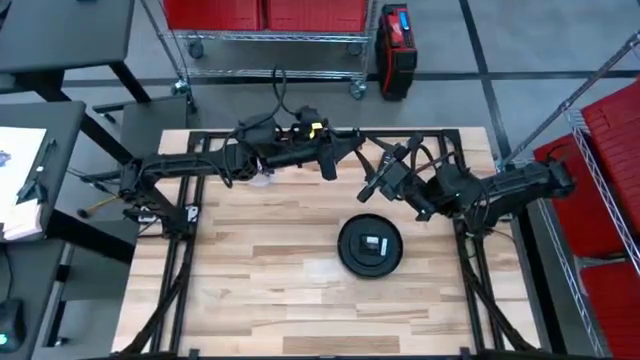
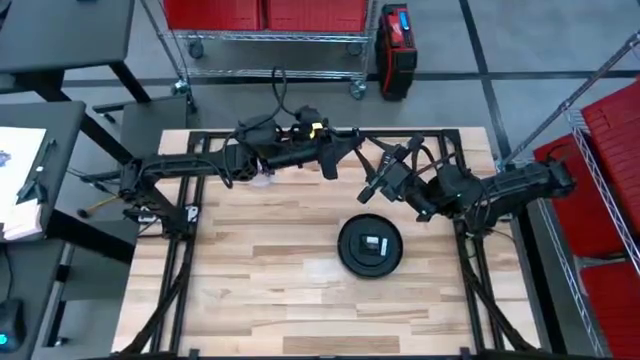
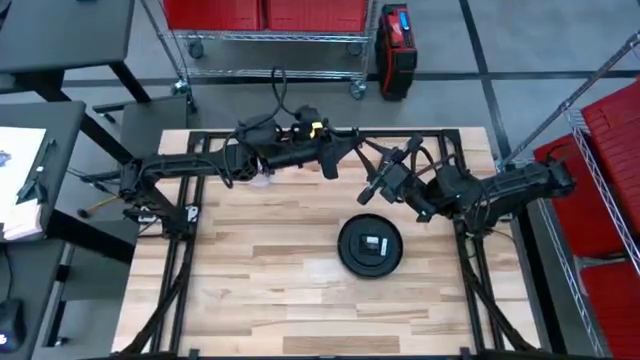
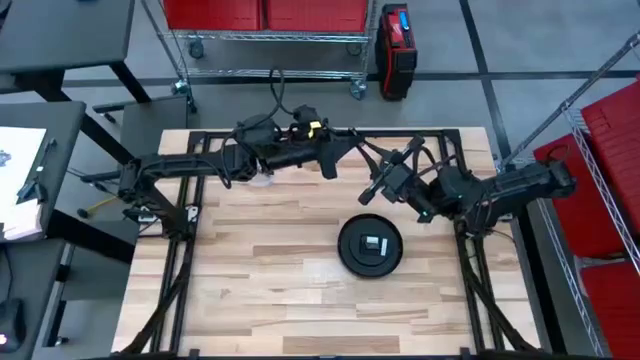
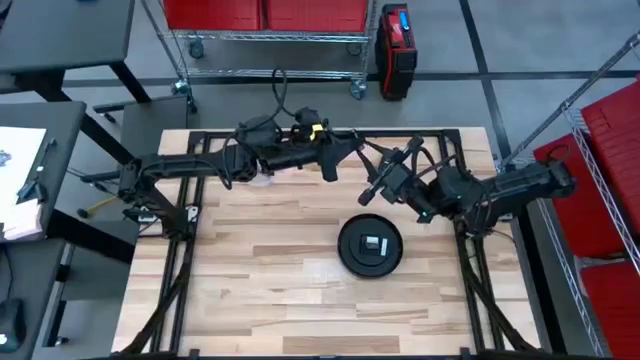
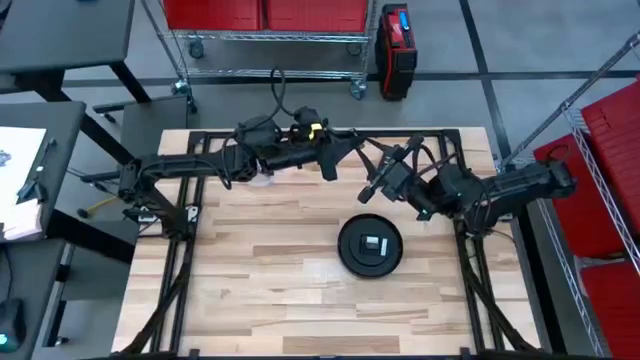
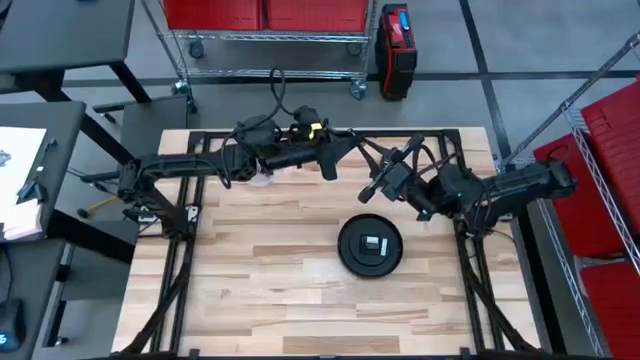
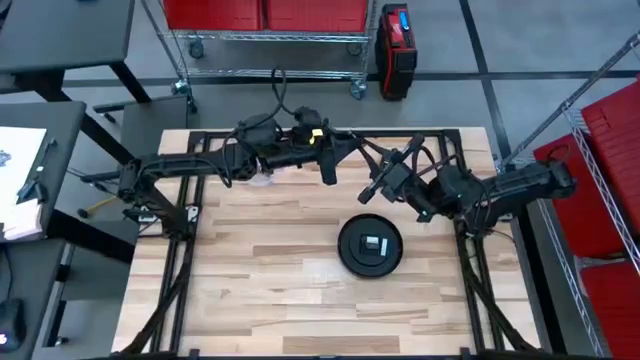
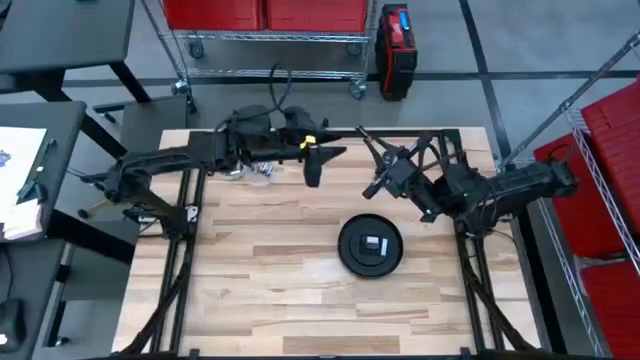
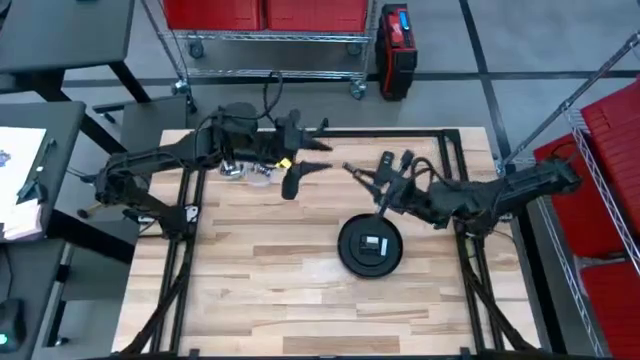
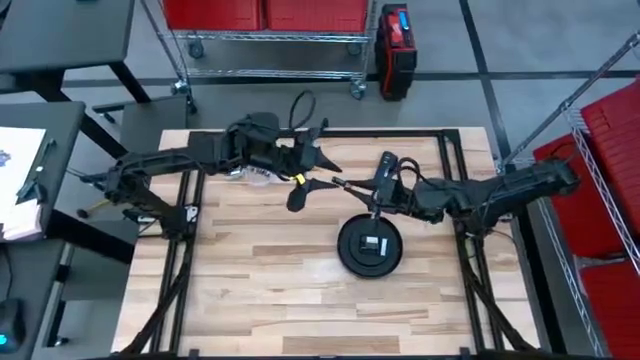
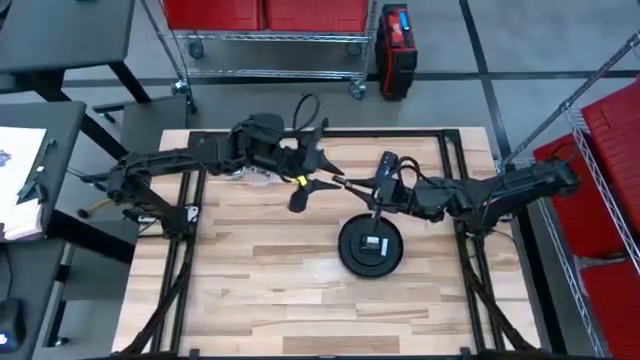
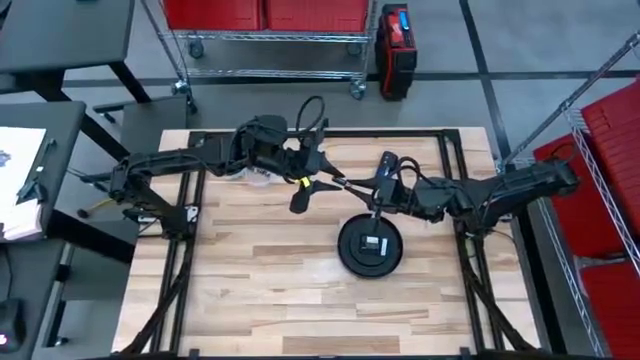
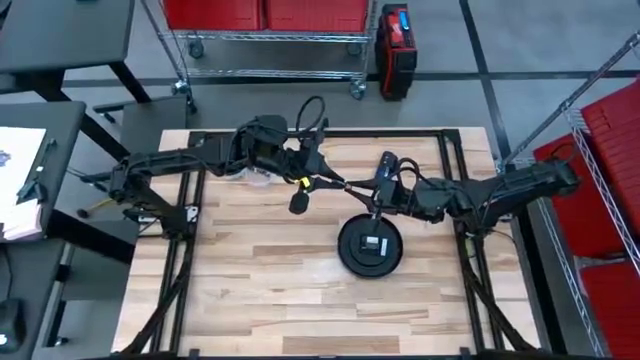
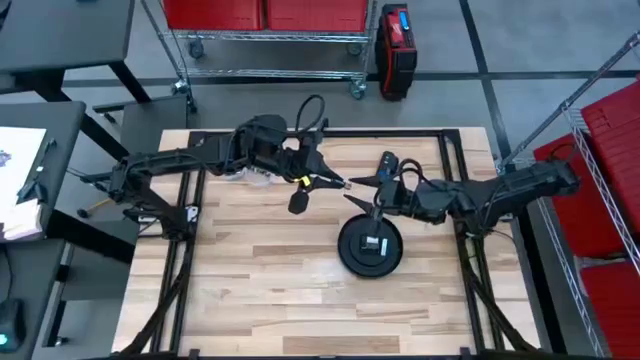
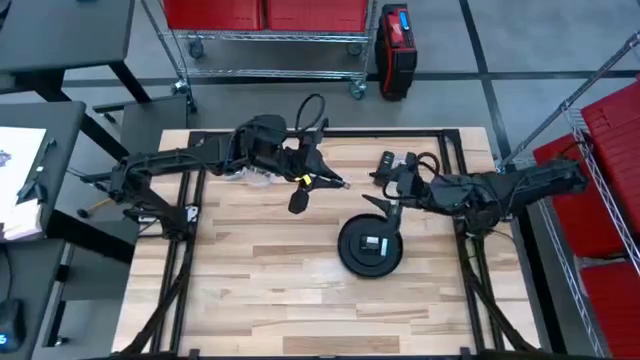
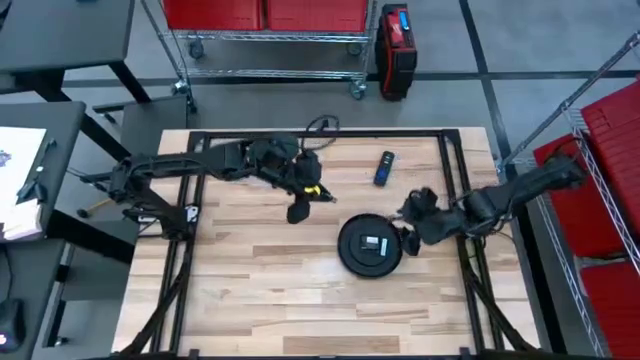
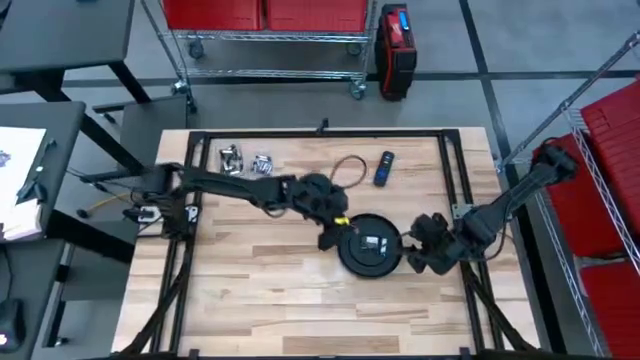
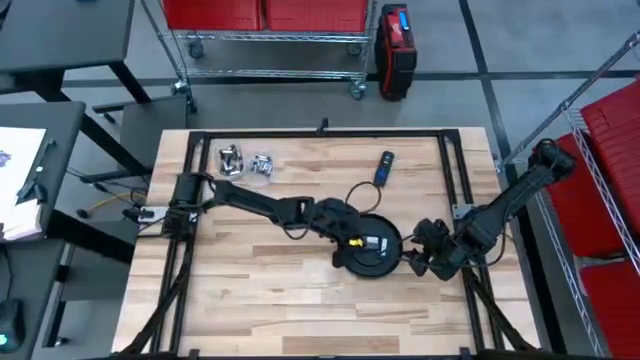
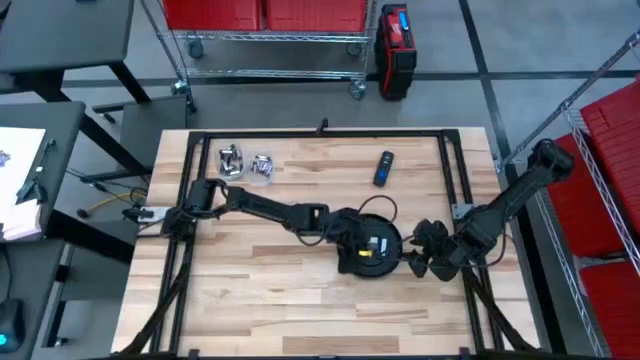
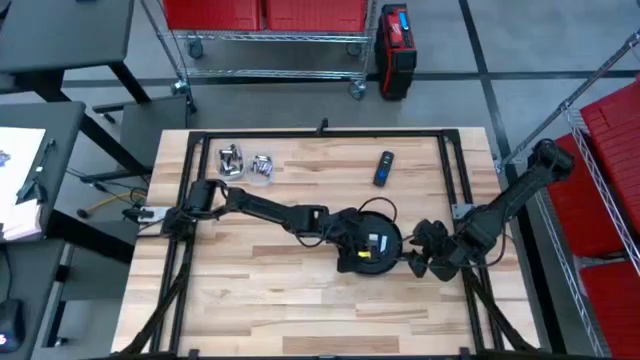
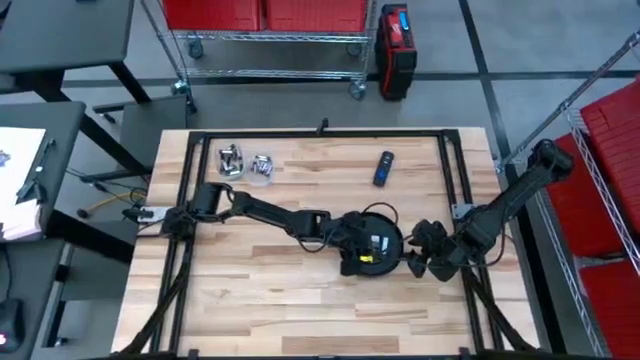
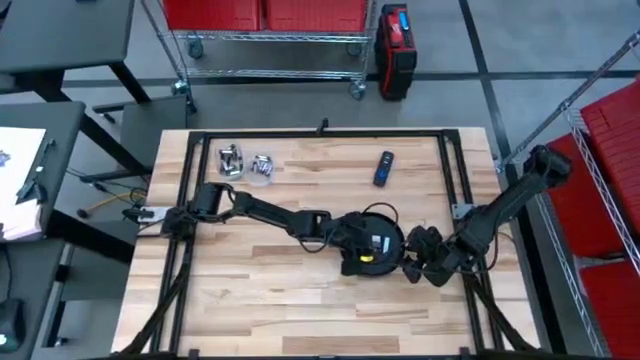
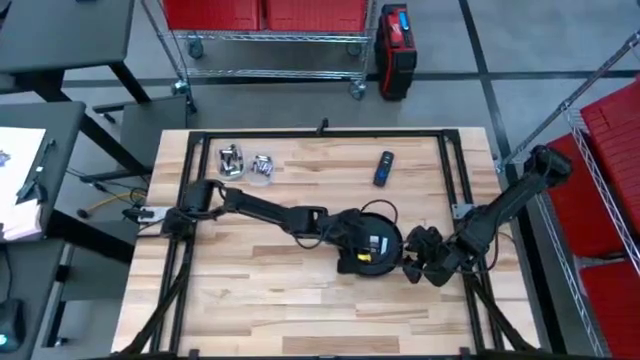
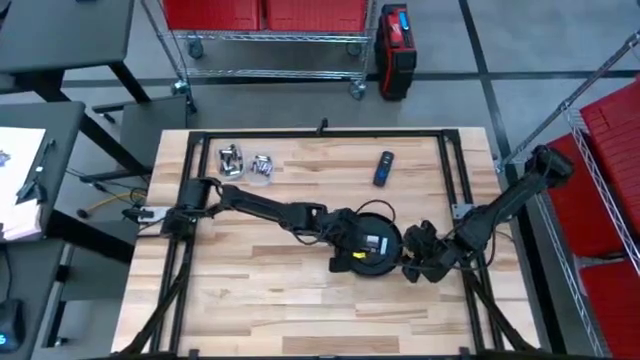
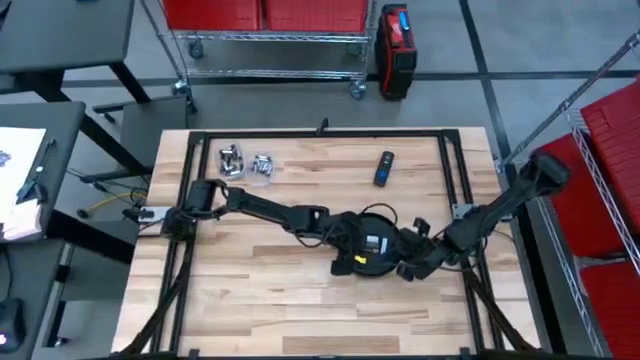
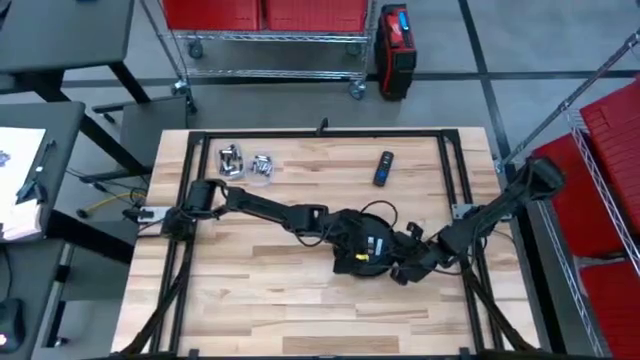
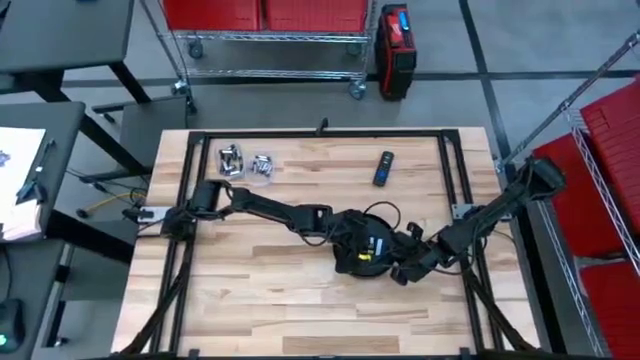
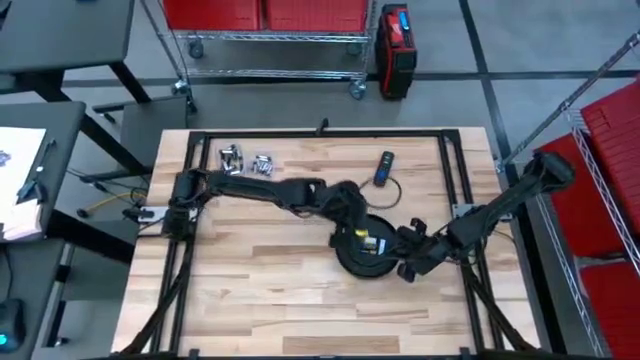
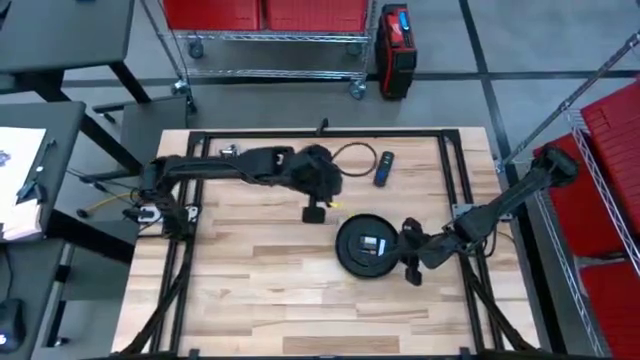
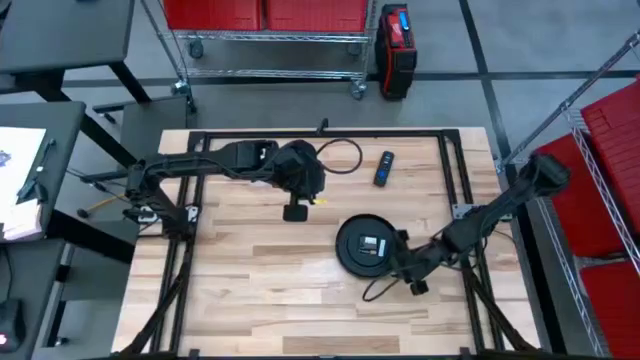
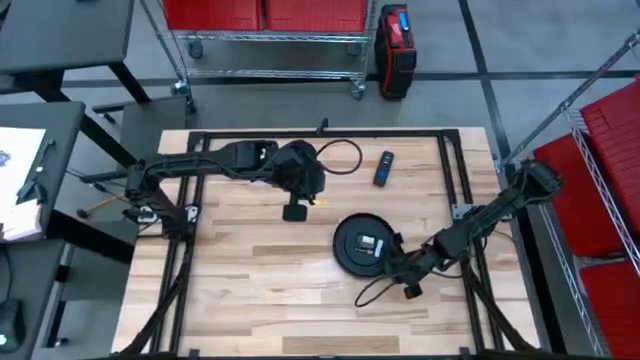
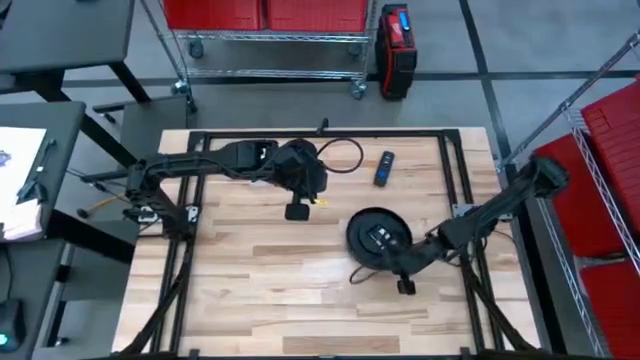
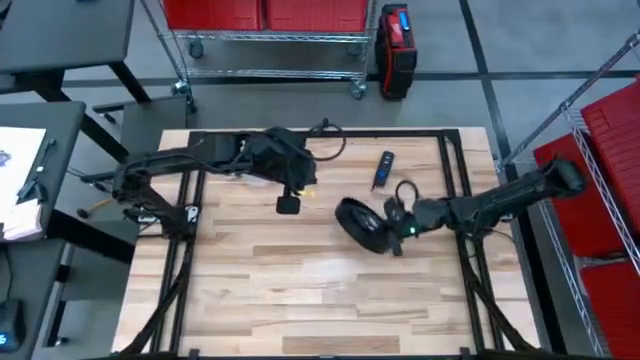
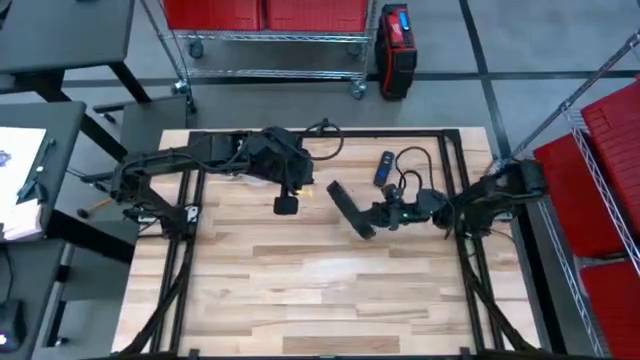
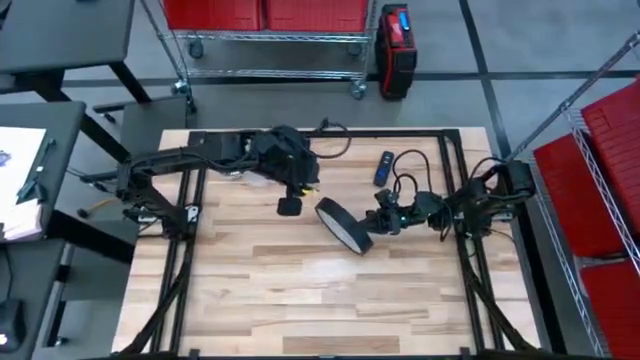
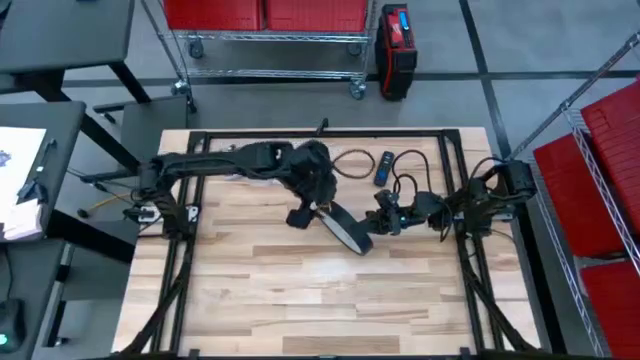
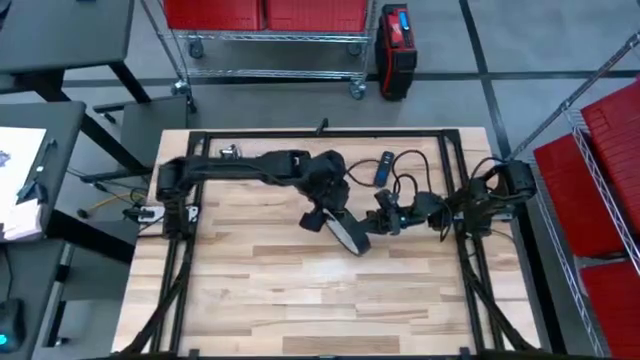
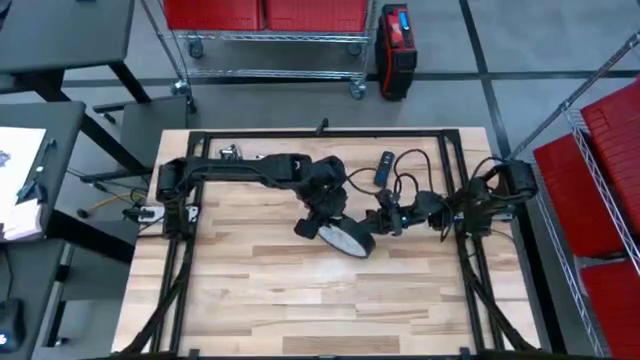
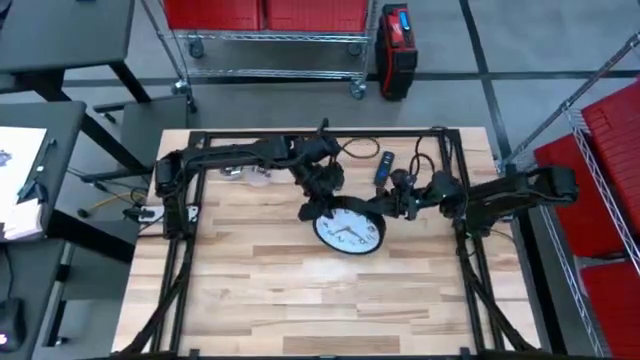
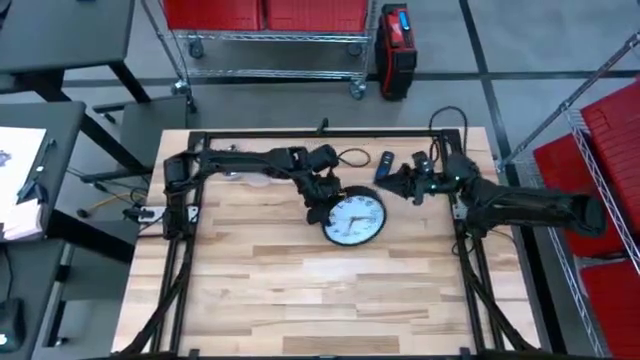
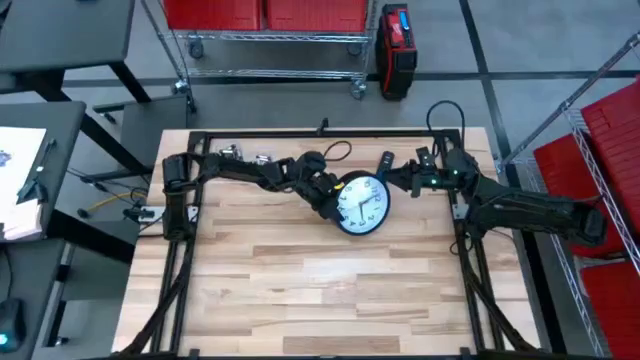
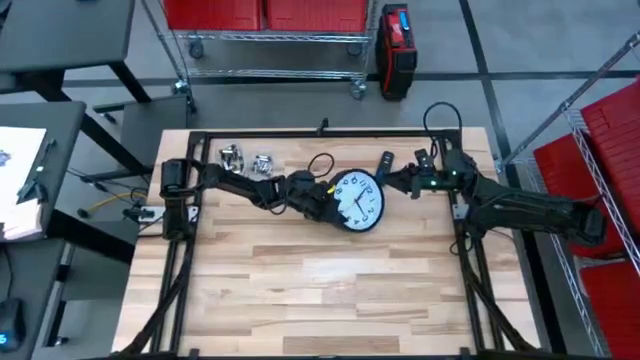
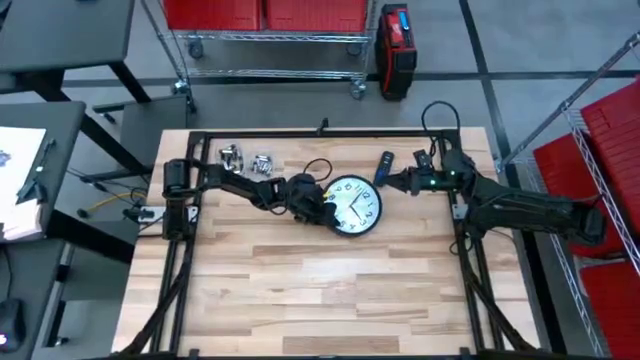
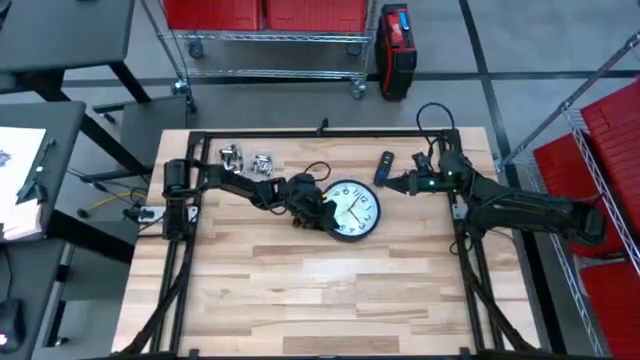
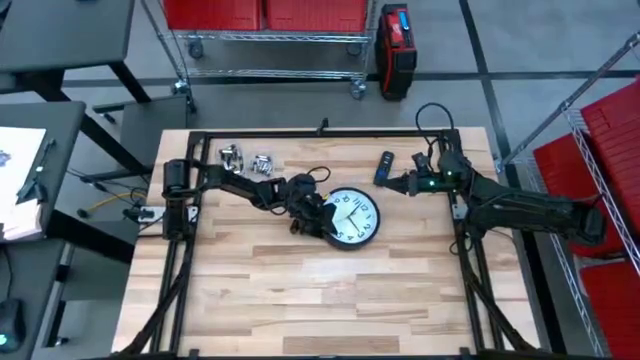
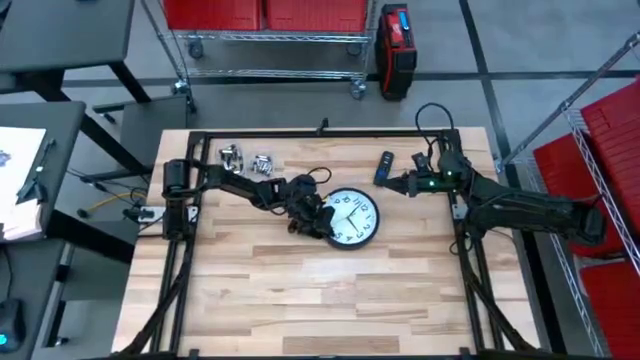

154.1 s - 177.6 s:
Task: Insert battery
Insert the brown battery into the wall clock
